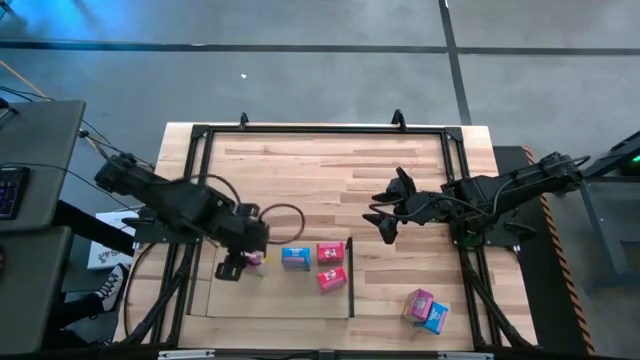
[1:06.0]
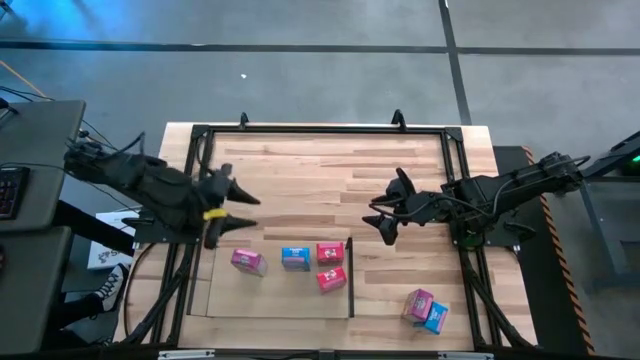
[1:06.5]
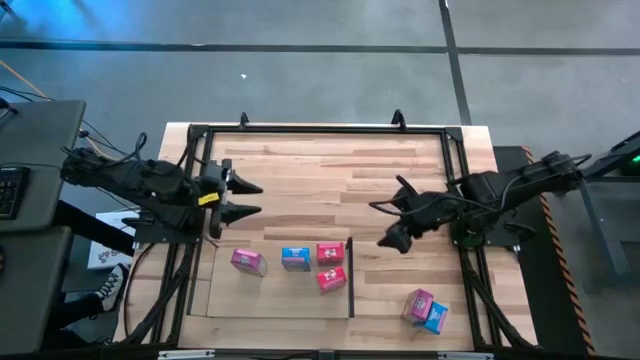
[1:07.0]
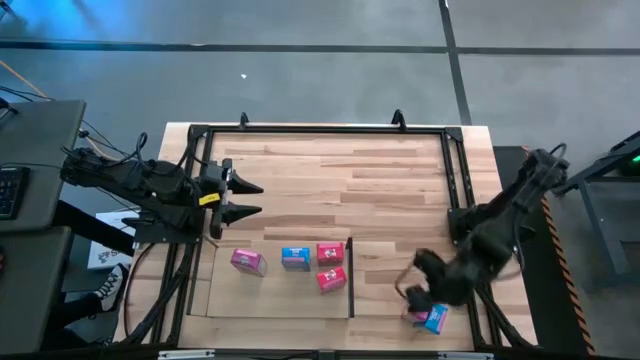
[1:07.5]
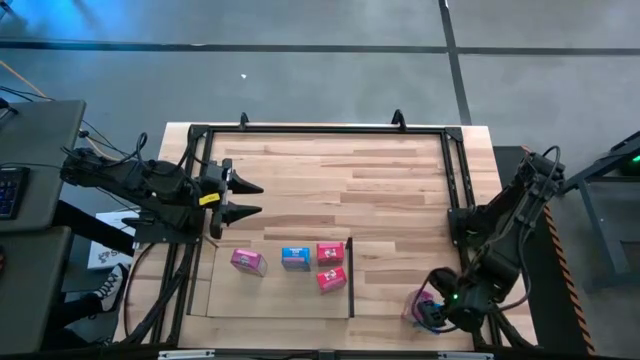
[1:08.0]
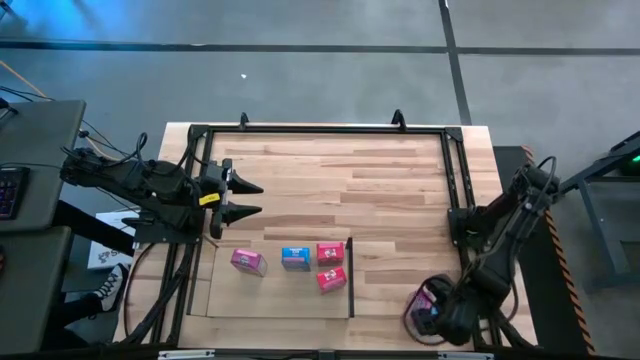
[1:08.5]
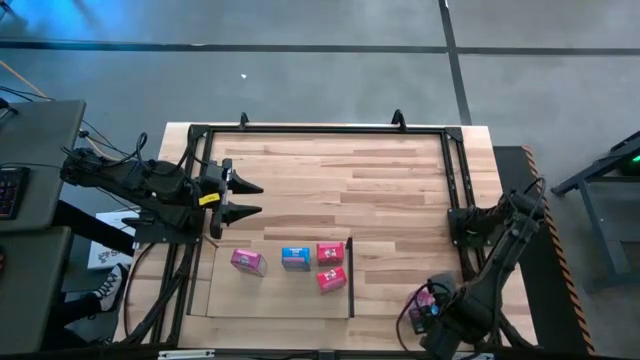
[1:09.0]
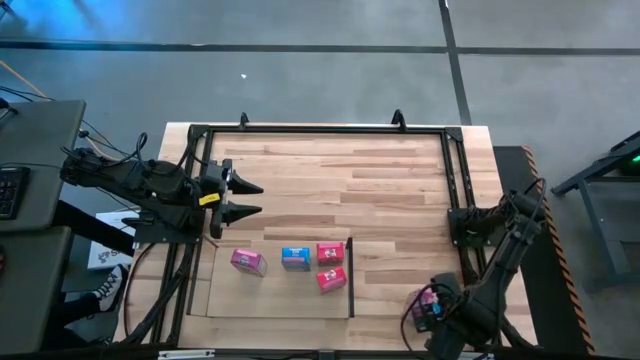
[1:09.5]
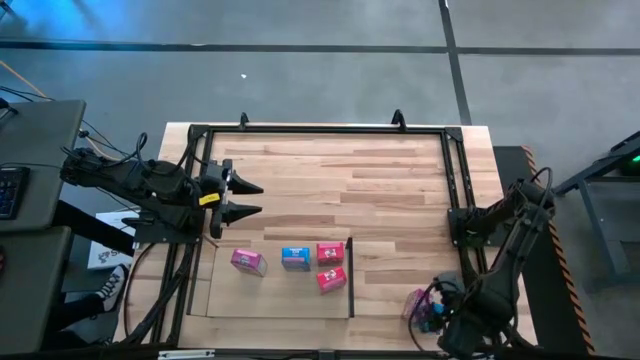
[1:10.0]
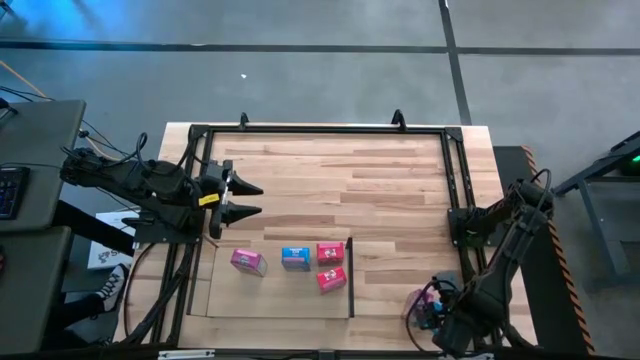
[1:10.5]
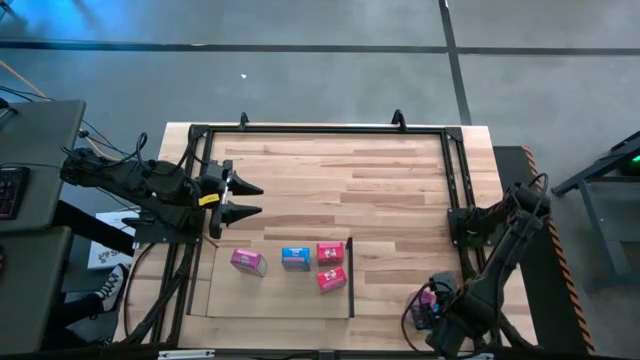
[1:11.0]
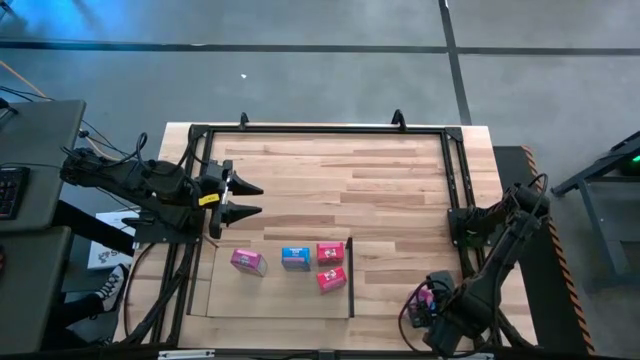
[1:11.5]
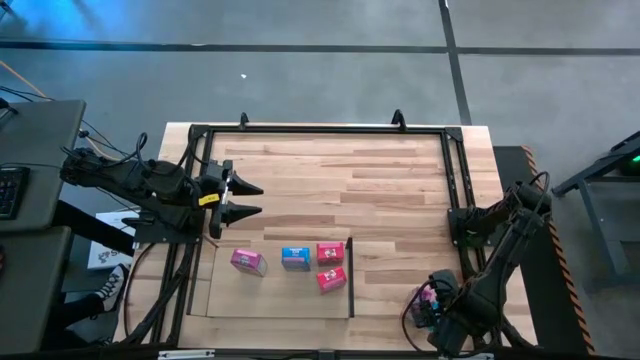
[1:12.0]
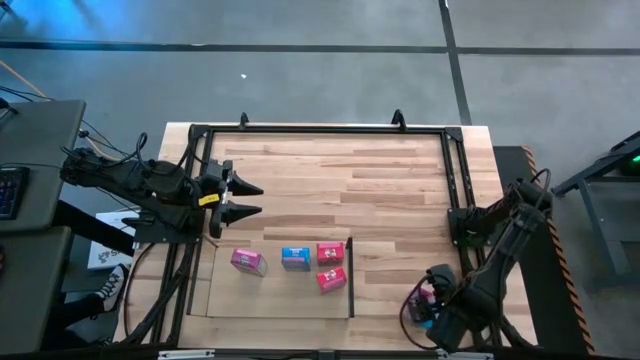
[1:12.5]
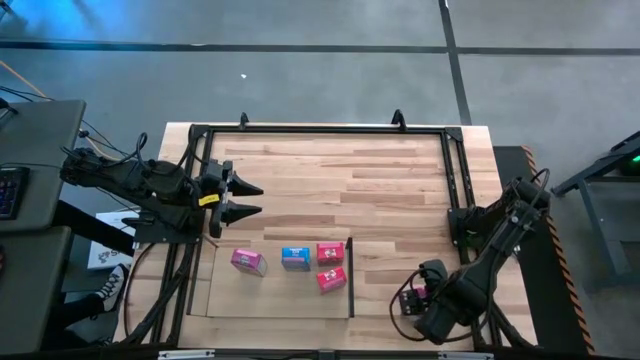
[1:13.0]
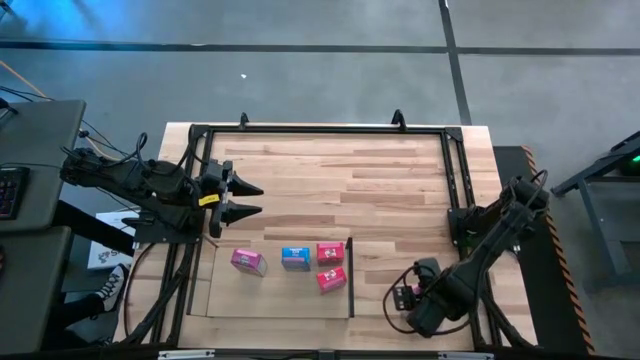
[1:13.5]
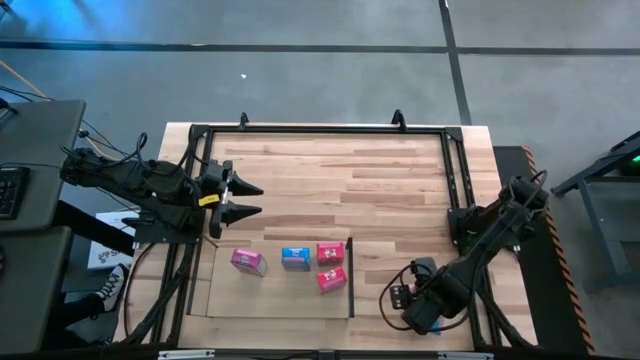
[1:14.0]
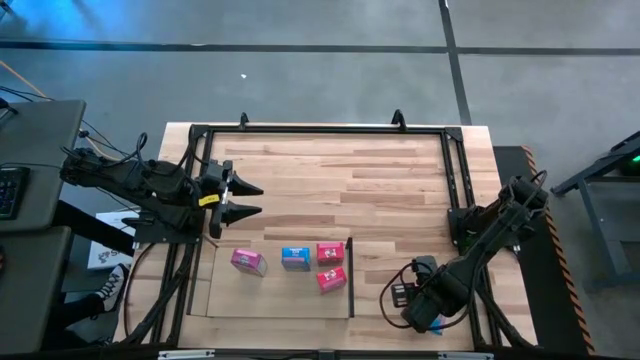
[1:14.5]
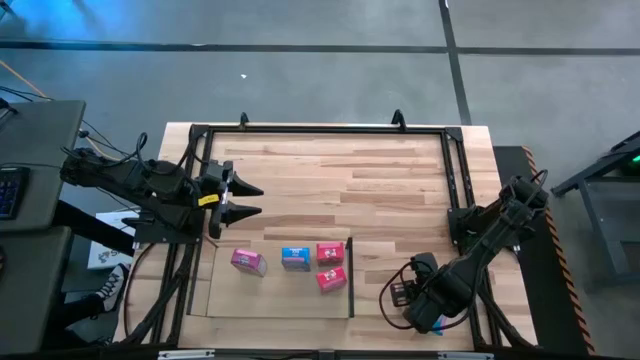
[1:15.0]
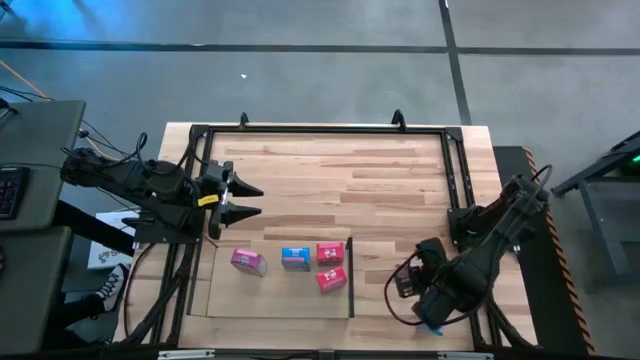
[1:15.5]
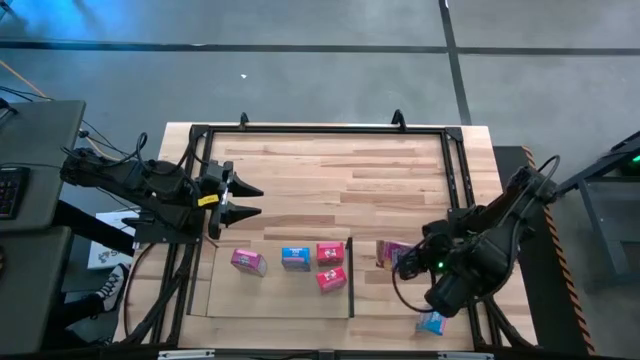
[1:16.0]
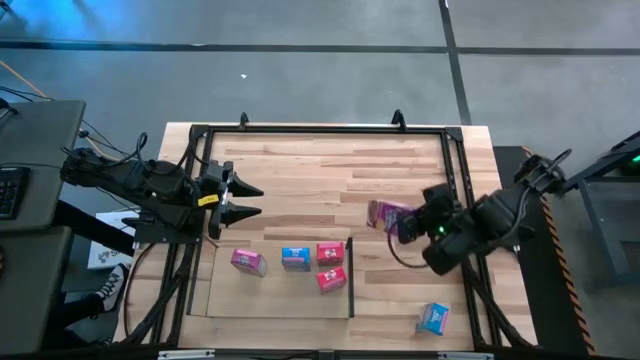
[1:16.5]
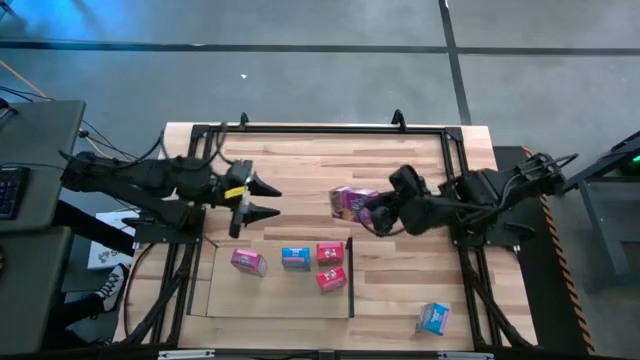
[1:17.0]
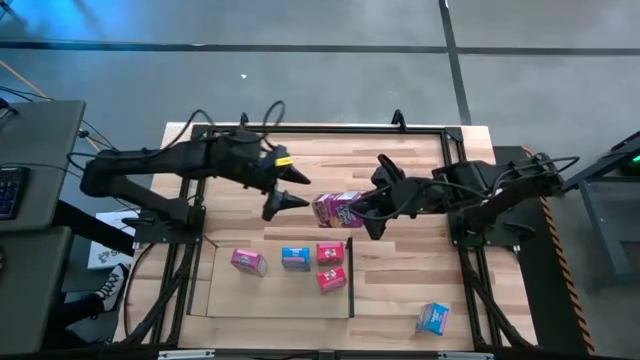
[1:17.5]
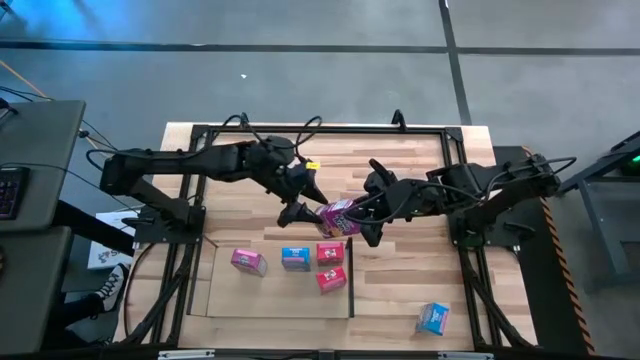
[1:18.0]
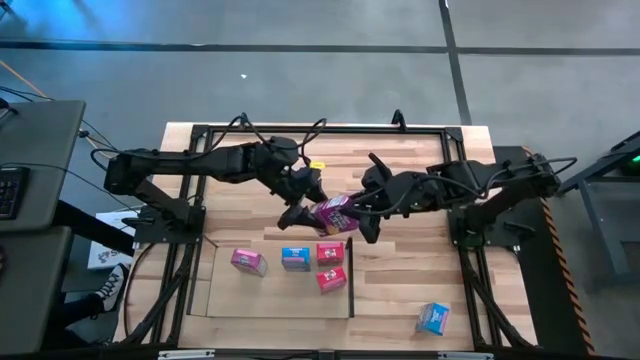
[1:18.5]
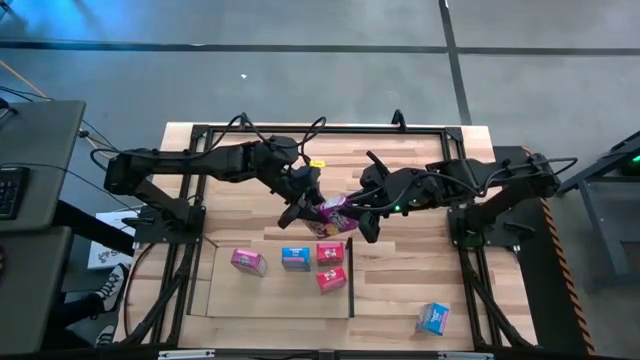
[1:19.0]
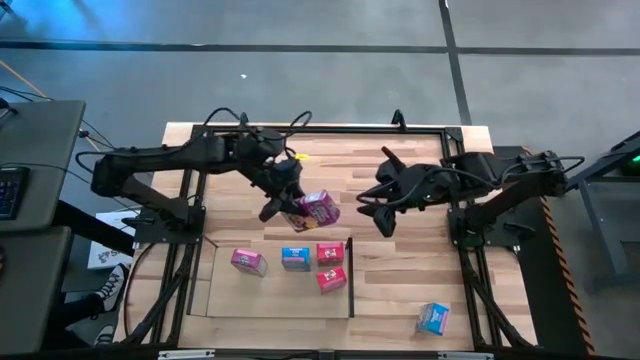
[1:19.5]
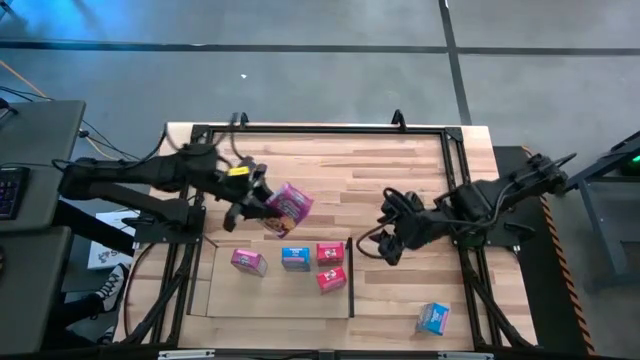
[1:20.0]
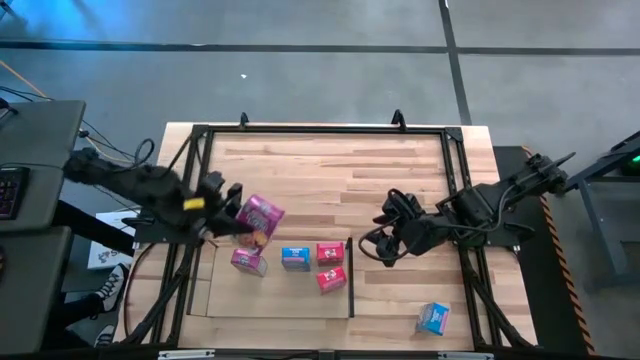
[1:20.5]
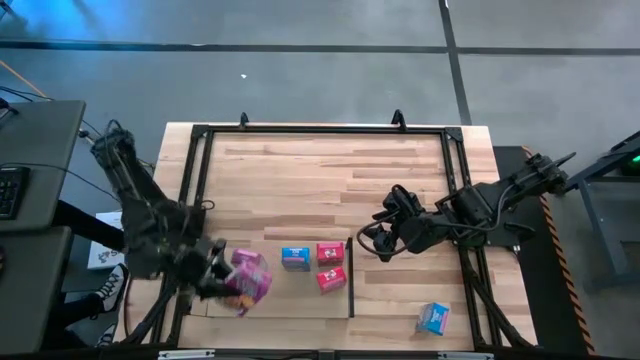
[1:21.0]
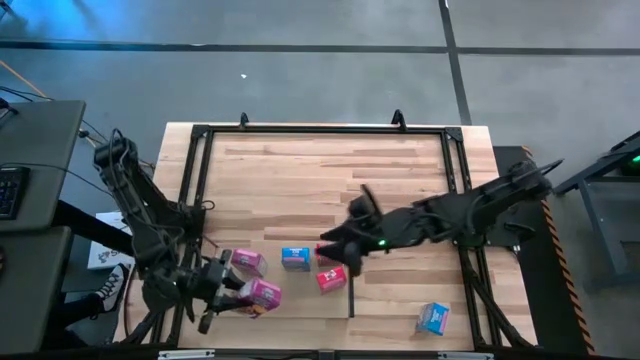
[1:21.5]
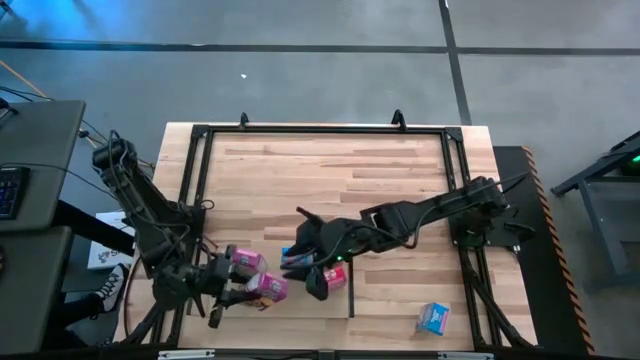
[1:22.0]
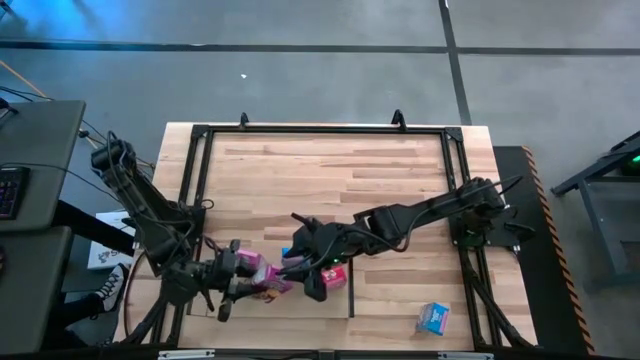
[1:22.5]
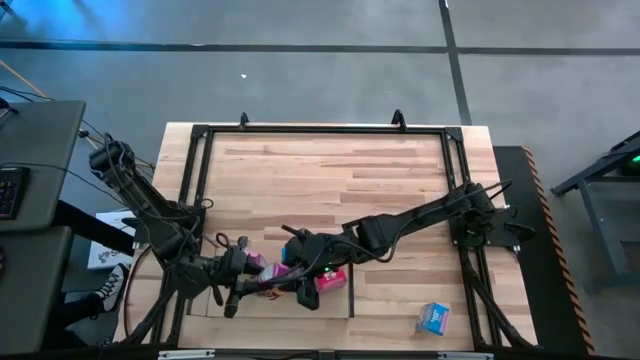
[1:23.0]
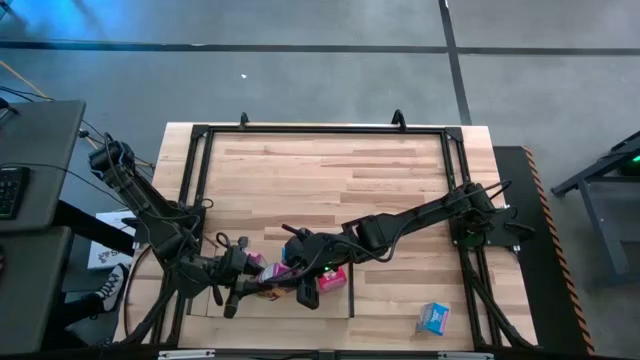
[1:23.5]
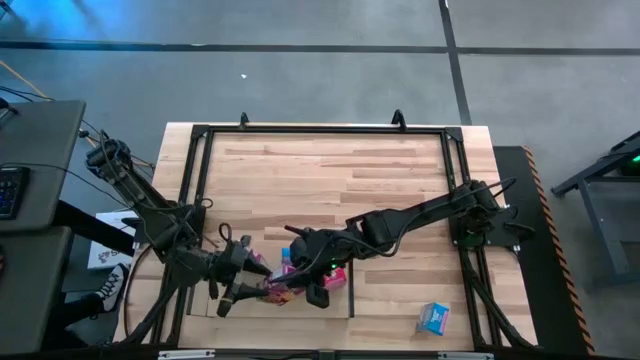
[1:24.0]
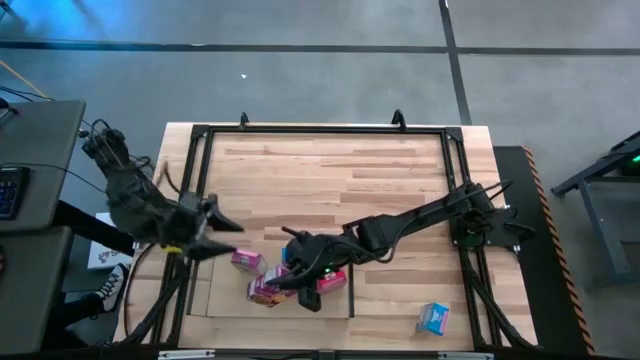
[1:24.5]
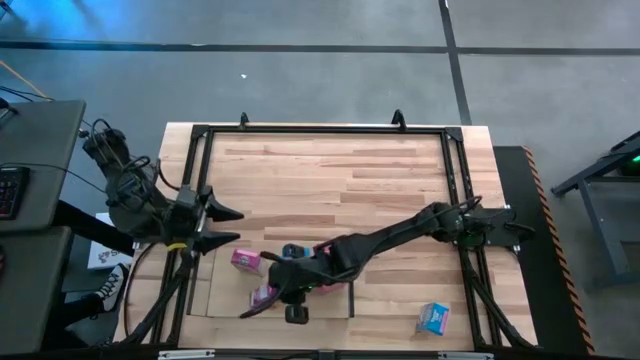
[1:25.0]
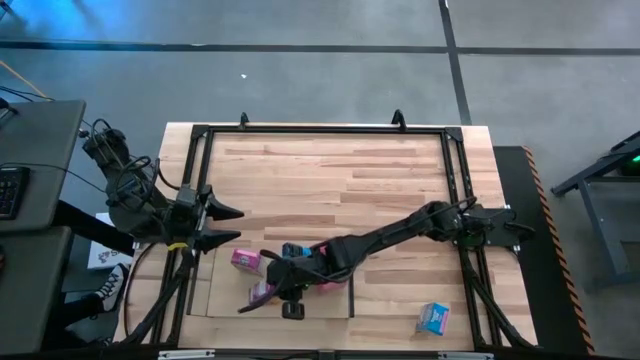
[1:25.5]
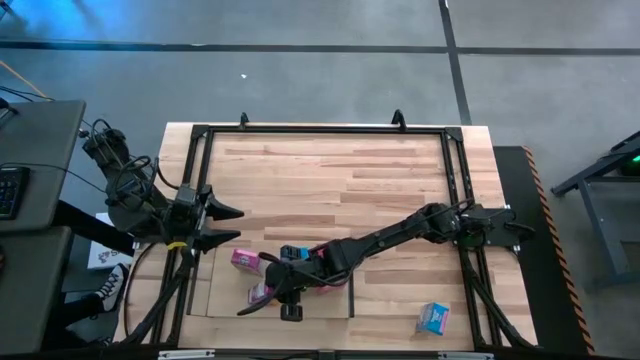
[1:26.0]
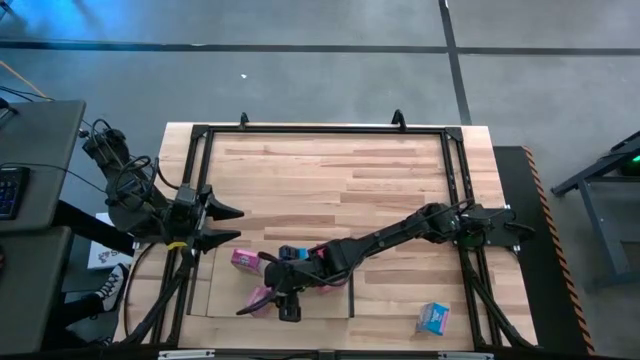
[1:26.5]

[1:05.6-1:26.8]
Task: Stack cereal on shelf
Put the purple cereal box on the shelf

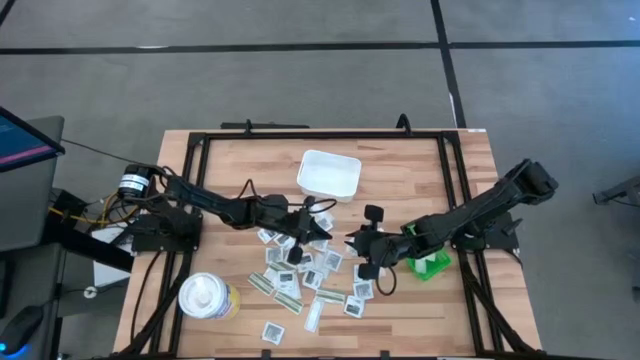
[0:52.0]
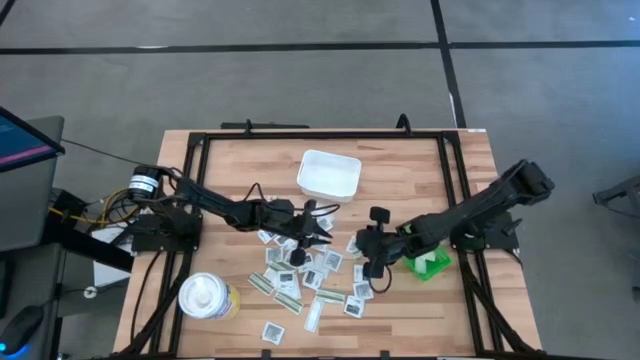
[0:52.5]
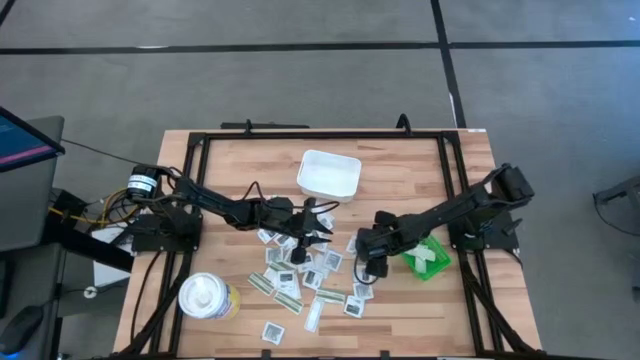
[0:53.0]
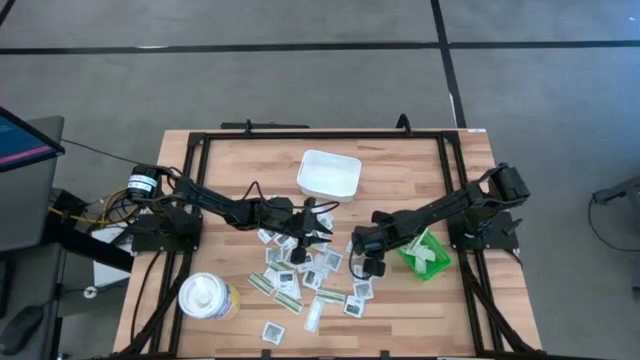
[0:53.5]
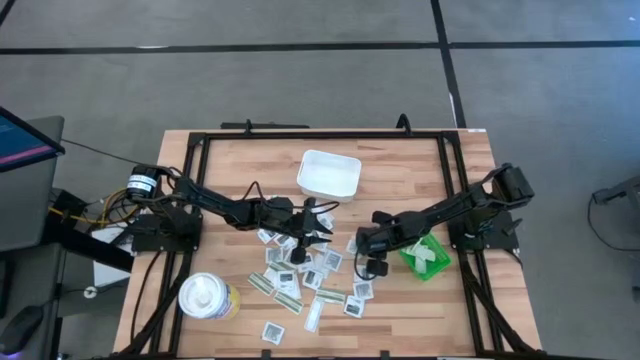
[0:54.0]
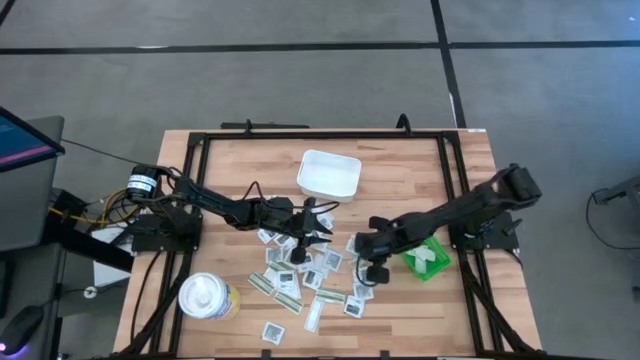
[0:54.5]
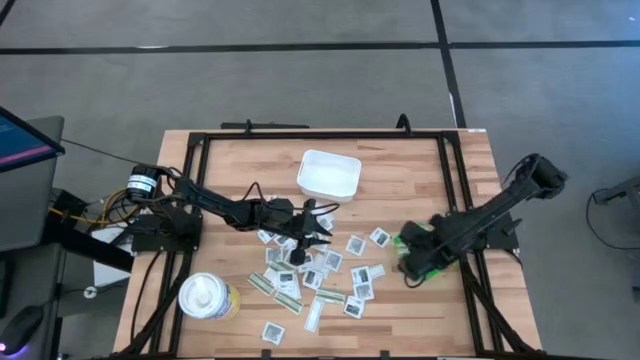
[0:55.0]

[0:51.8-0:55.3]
Task: Pick & Place First Aid Supplies
Put the bandage pack into the green bin
